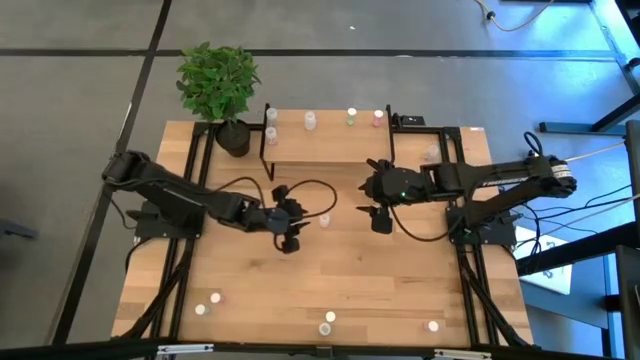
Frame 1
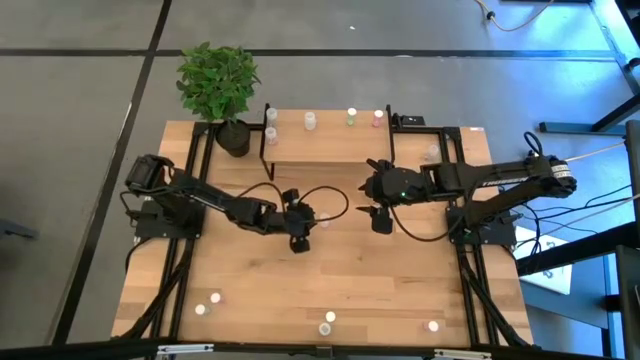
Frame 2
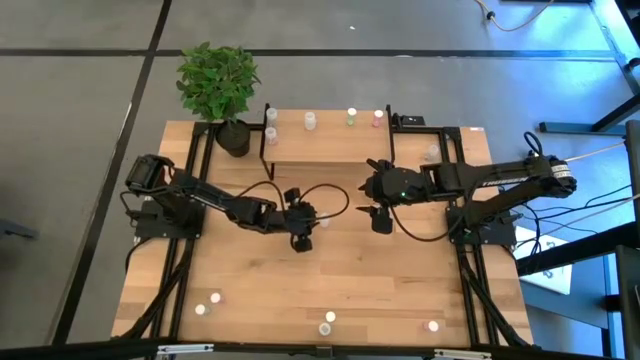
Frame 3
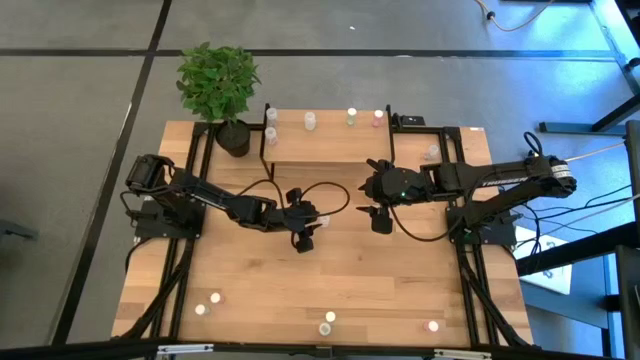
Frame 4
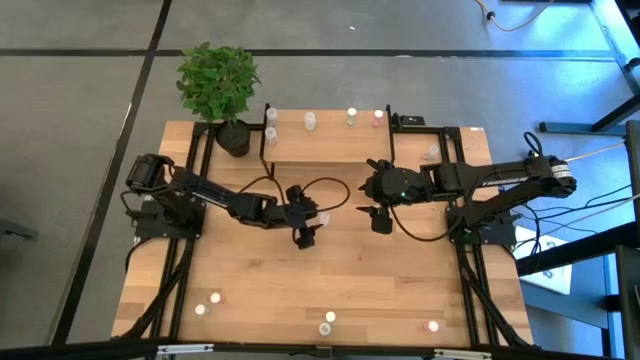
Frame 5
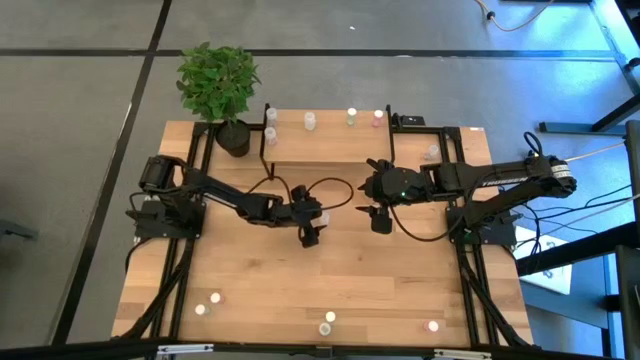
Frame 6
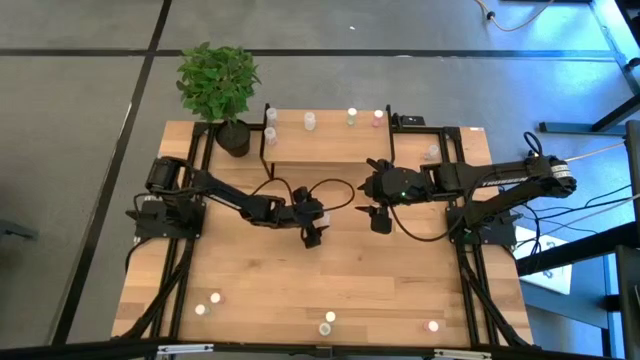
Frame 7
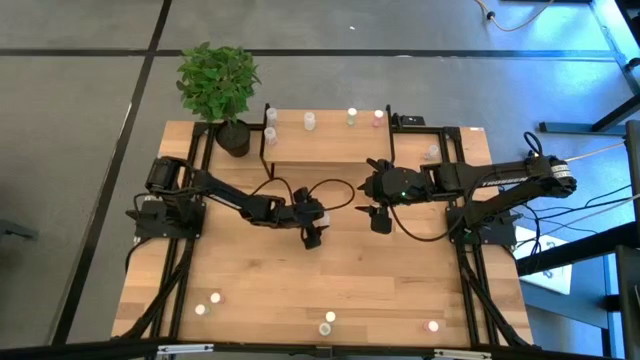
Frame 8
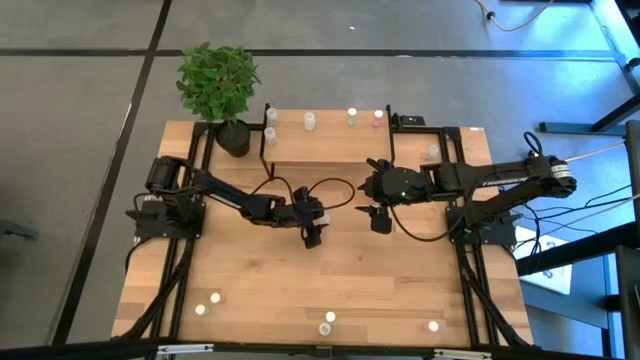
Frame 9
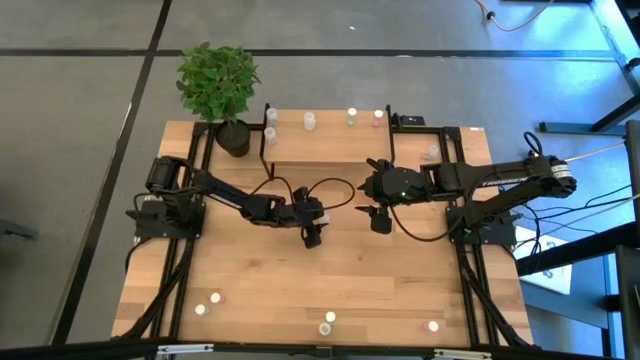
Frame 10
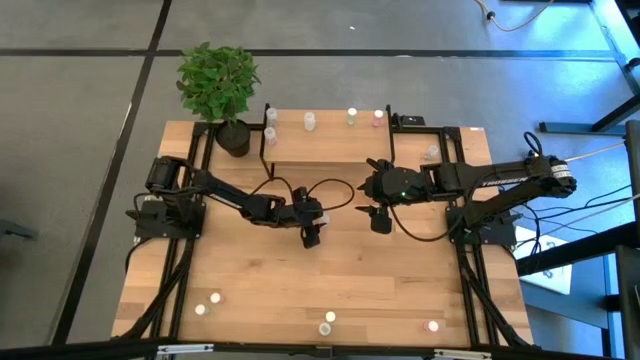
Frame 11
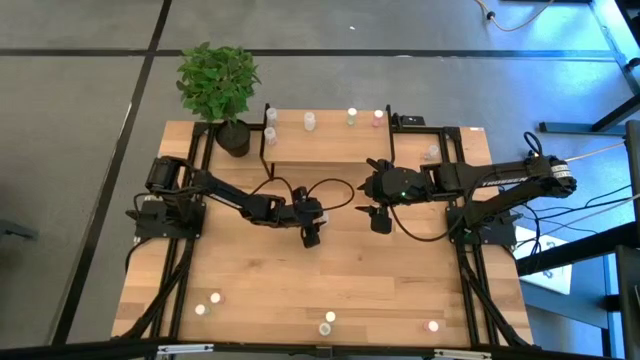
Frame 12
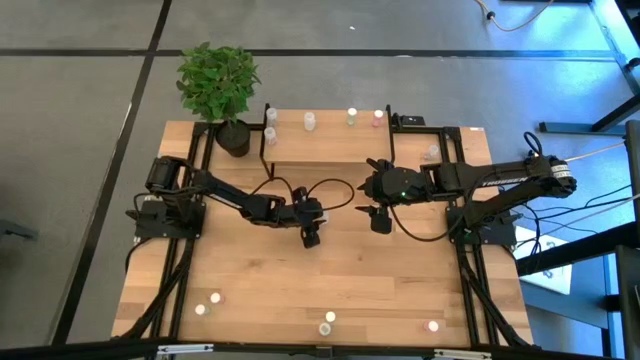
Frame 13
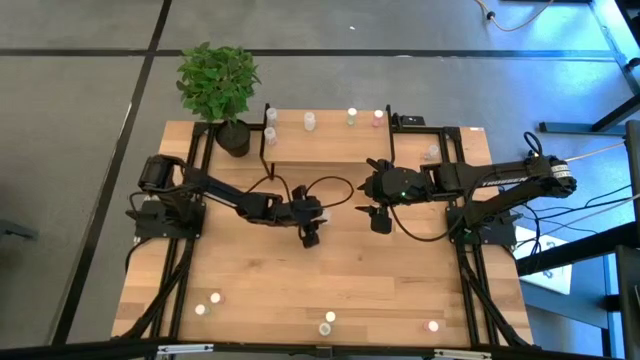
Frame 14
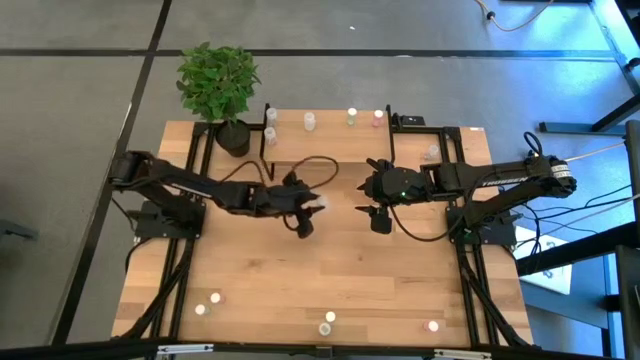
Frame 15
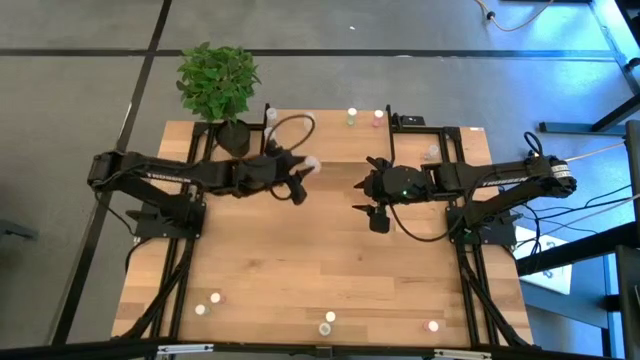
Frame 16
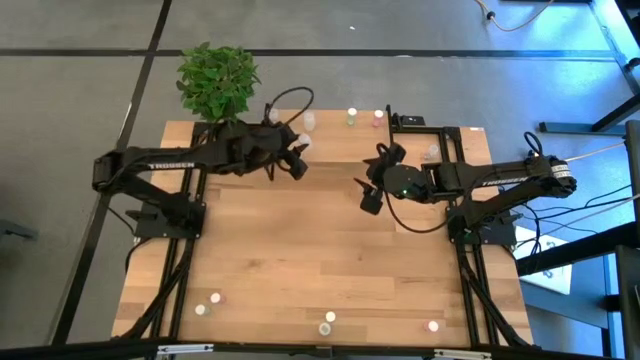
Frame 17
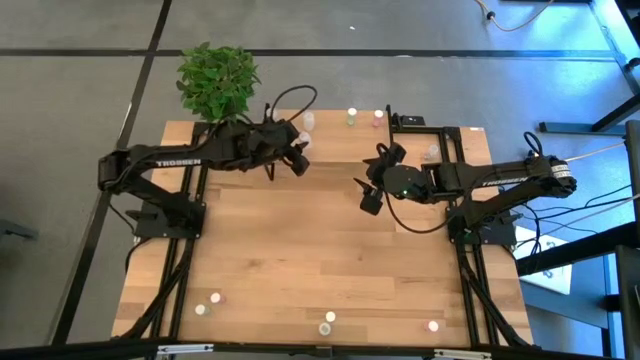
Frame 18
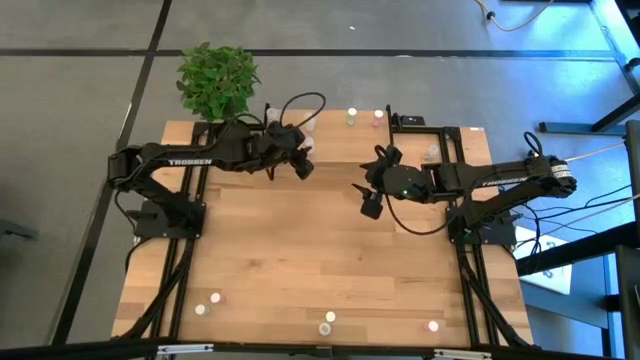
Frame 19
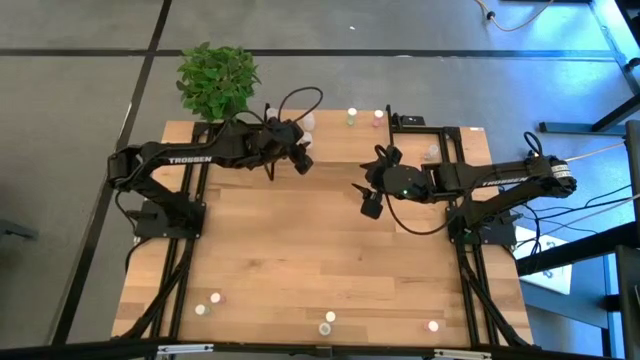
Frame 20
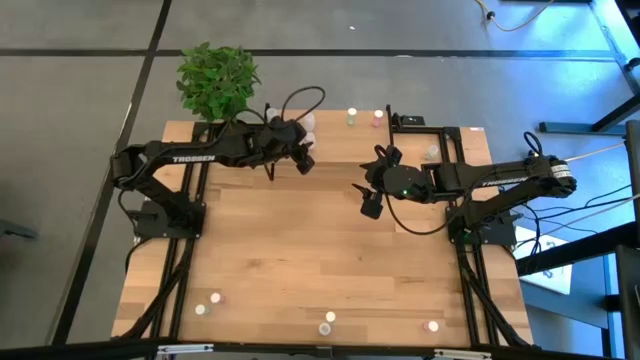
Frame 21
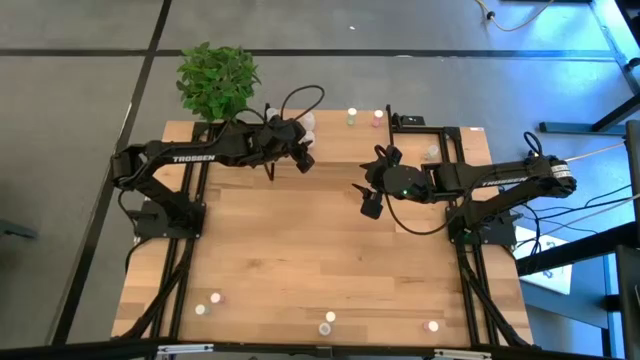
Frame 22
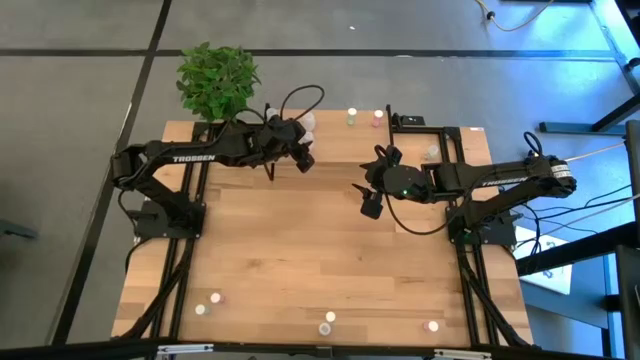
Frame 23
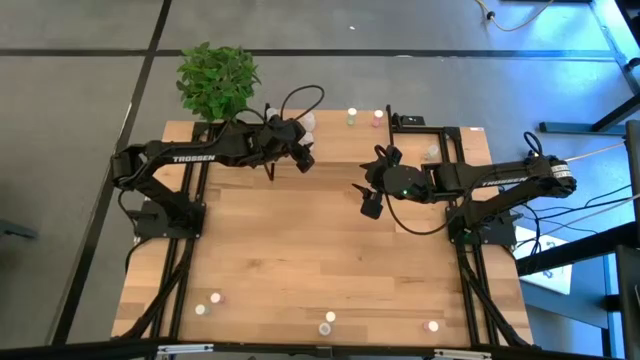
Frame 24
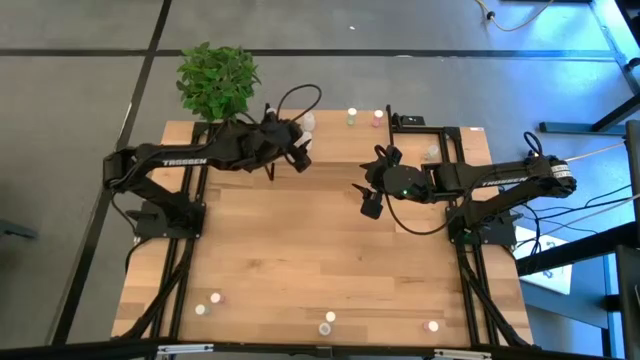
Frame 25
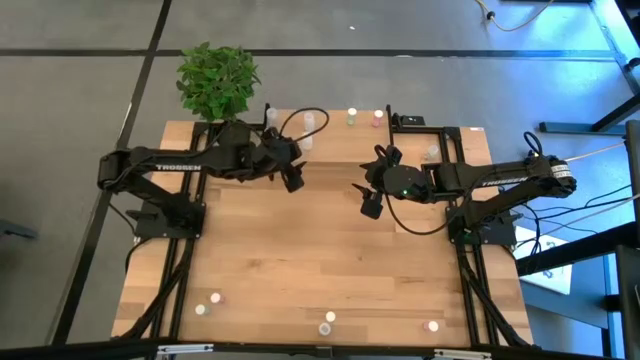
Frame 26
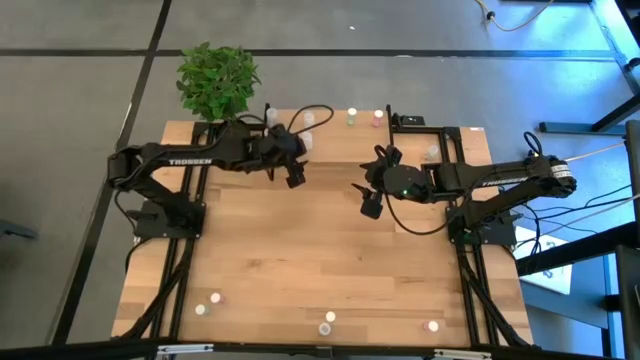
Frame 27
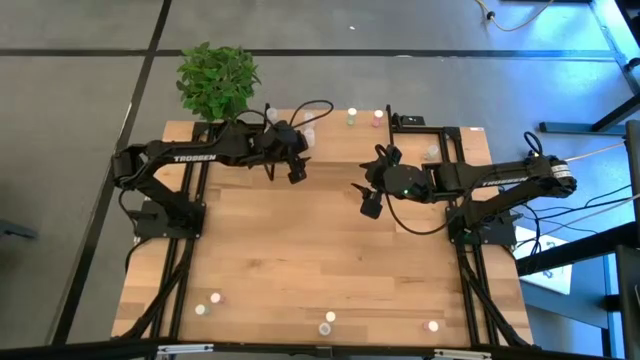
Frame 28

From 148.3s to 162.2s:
Task: Pick and place medicine bottles onto shelf by color
Put the top white pill bottle on the shelf aligned with the other white pill bottle

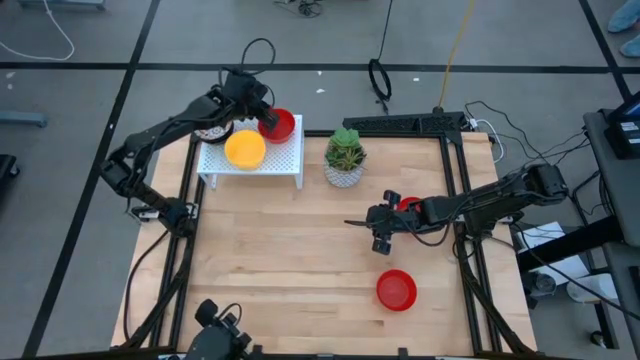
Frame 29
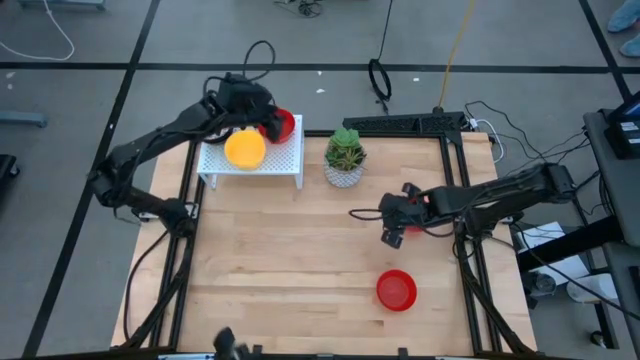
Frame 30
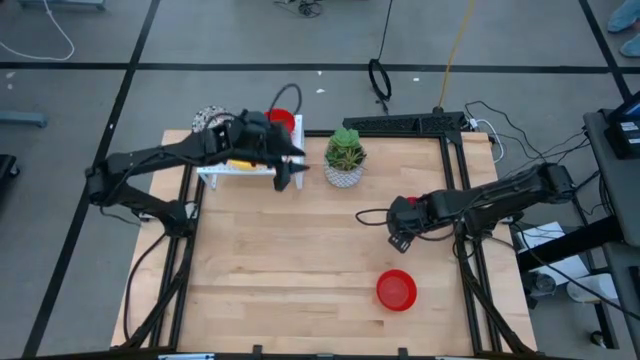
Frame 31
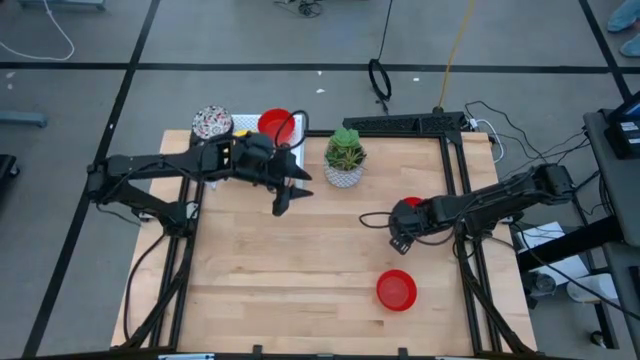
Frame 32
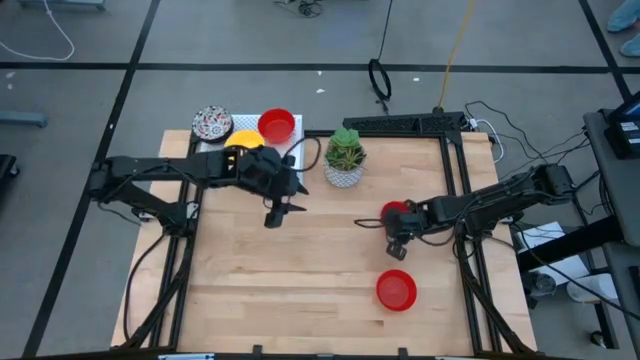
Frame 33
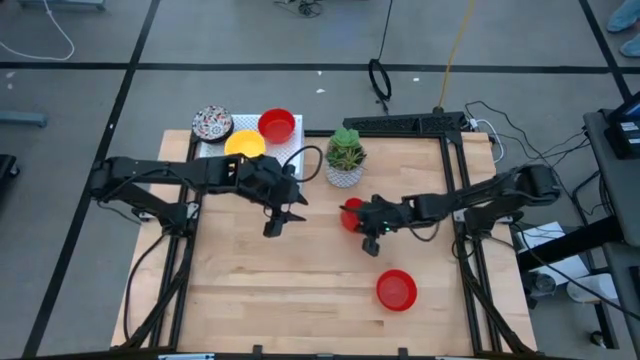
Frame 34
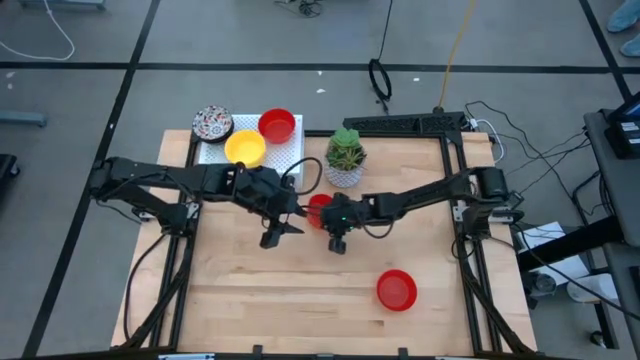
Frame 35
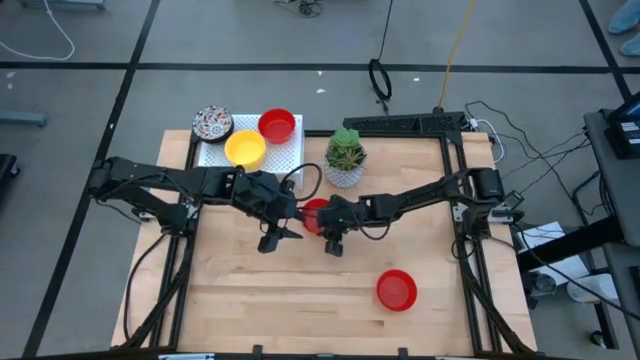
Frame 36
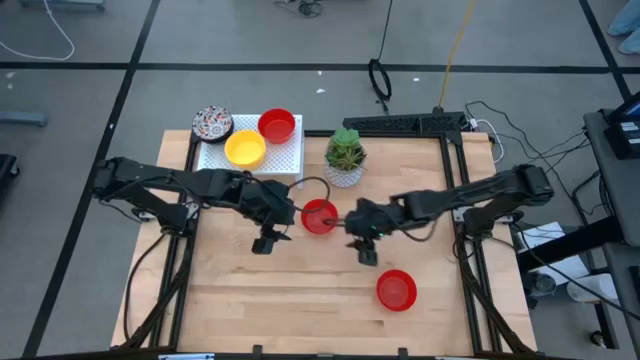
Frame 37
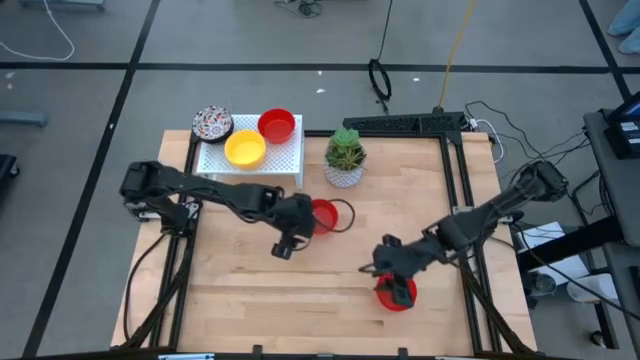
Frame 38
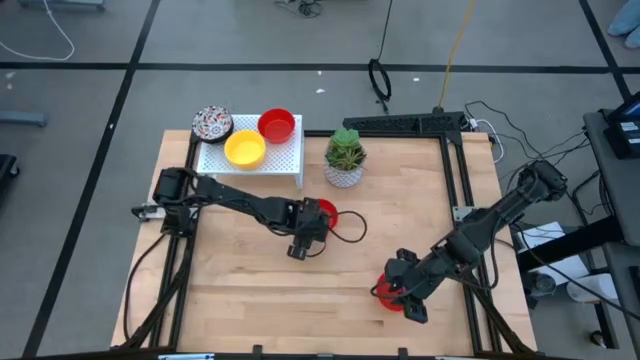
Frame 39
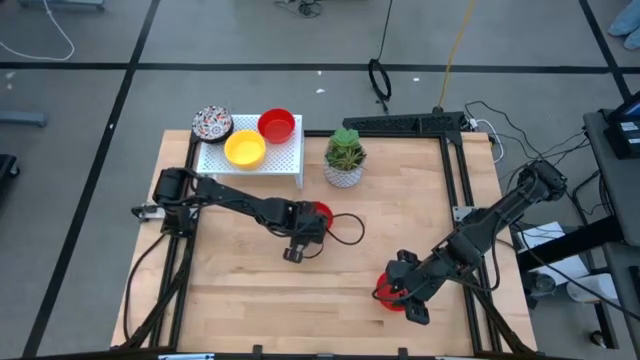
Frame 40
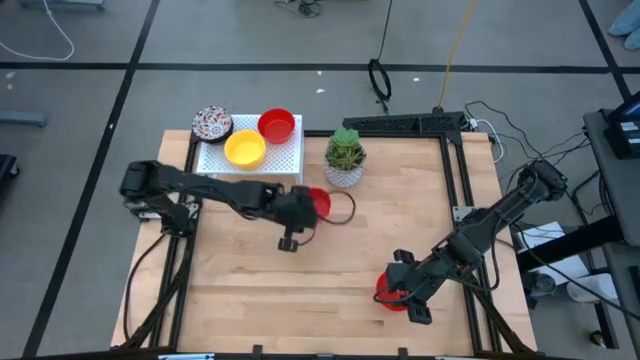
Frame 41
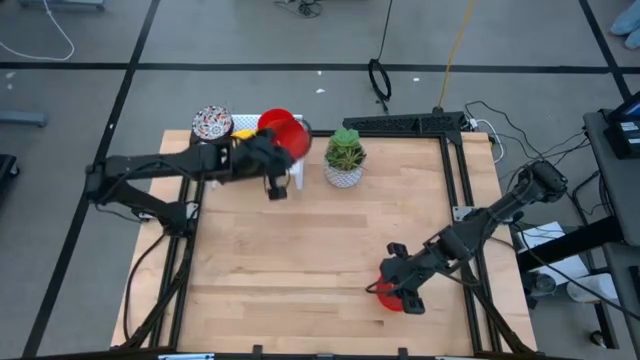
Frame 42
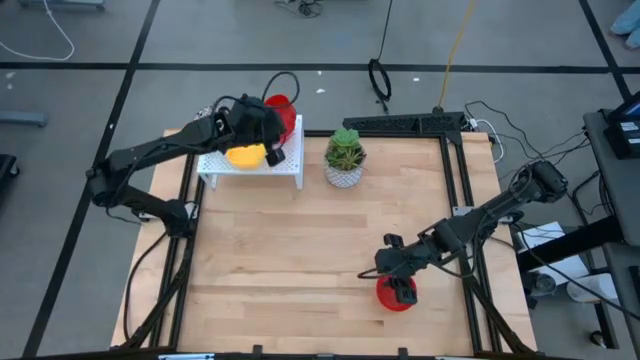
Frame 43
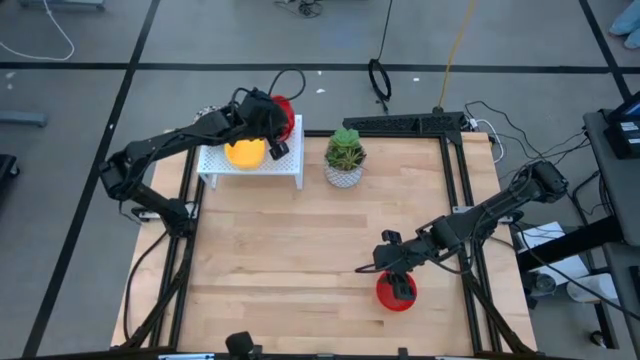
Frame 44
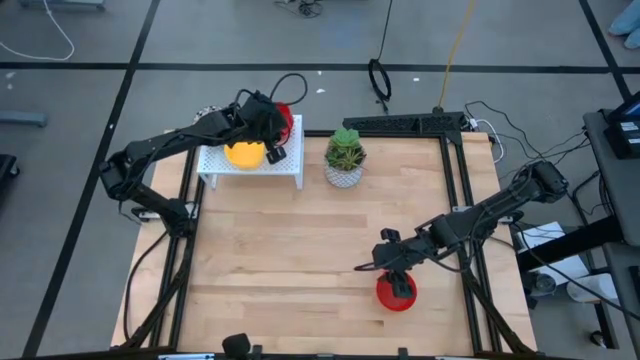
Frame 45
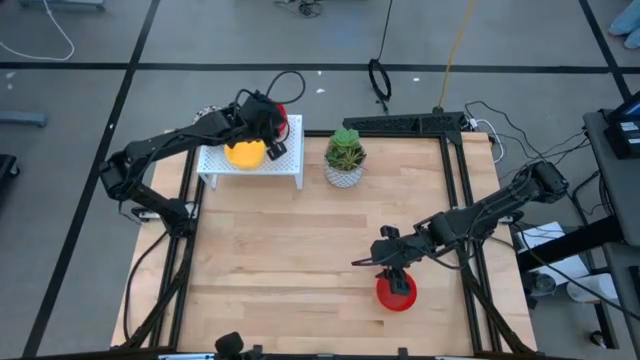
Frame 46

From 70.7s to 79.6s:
Task: Pick & Place Mini bowls
Stack the red bowl on top of the red bowl on the shelf
